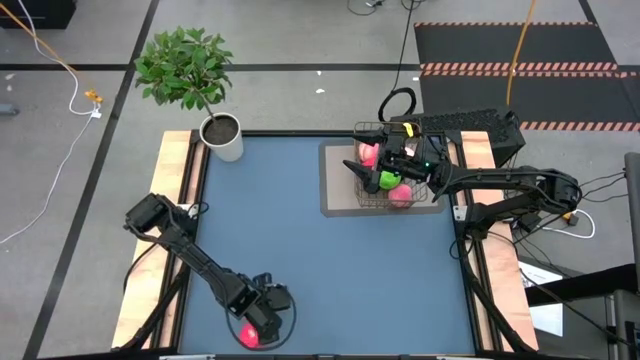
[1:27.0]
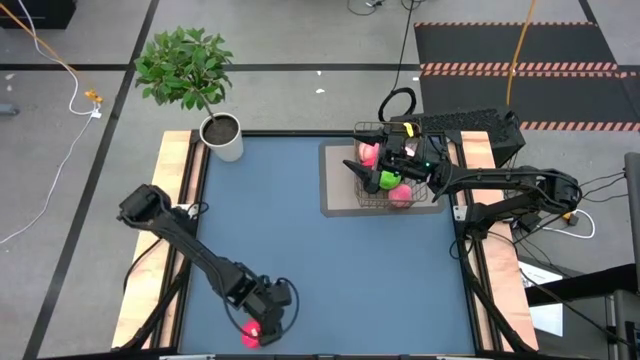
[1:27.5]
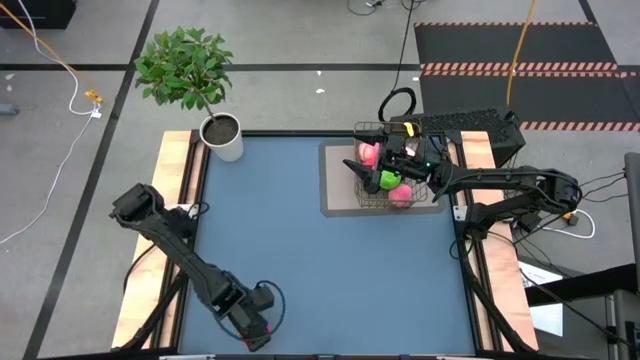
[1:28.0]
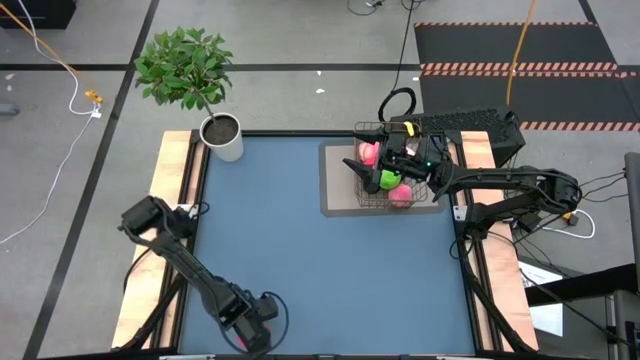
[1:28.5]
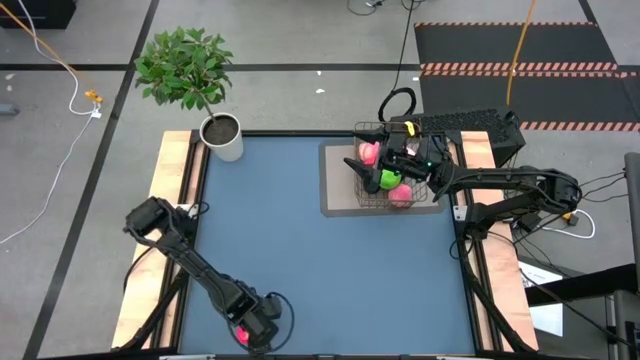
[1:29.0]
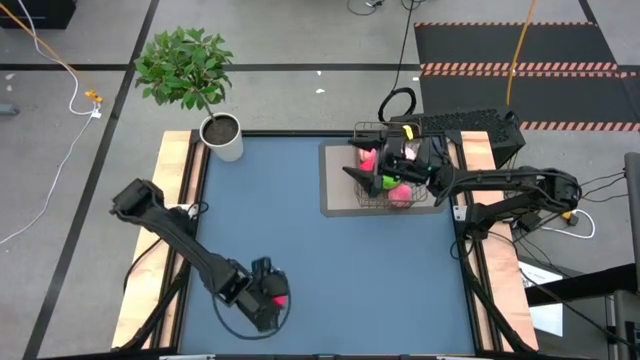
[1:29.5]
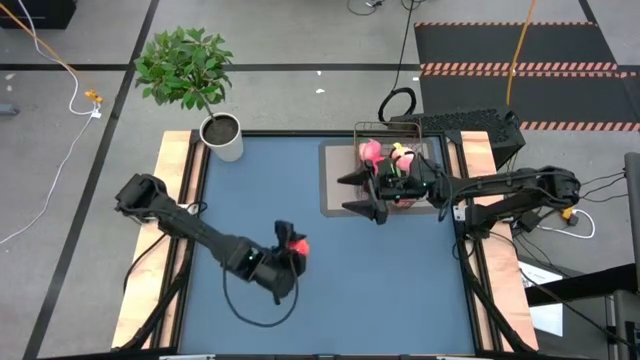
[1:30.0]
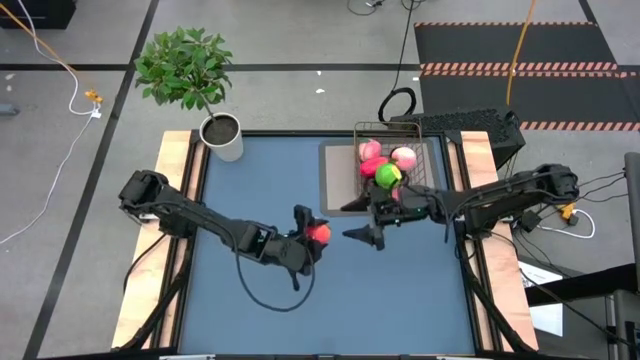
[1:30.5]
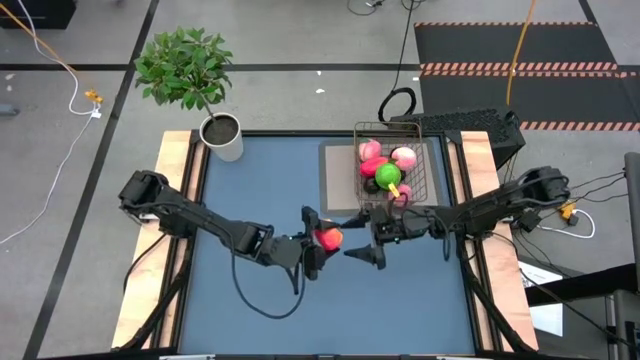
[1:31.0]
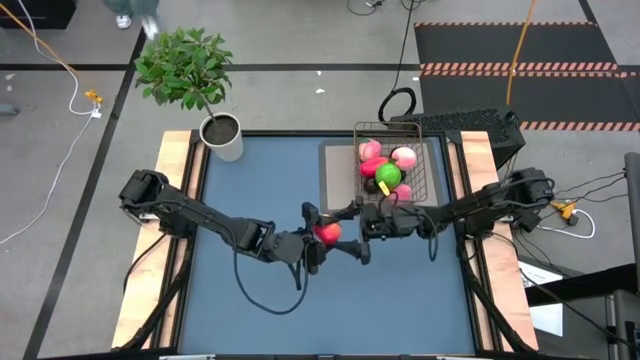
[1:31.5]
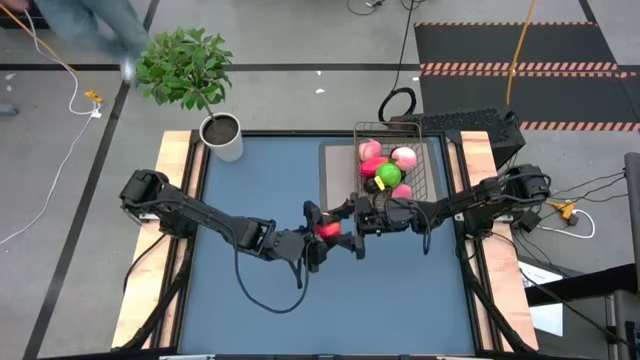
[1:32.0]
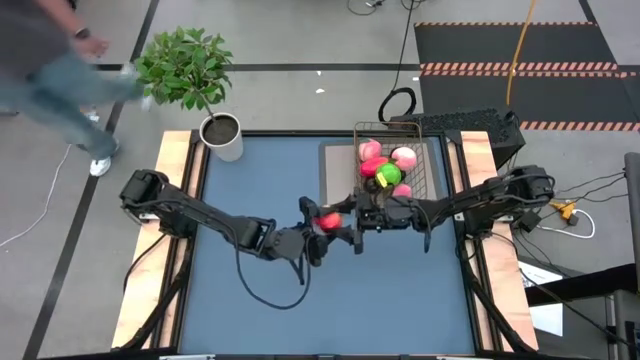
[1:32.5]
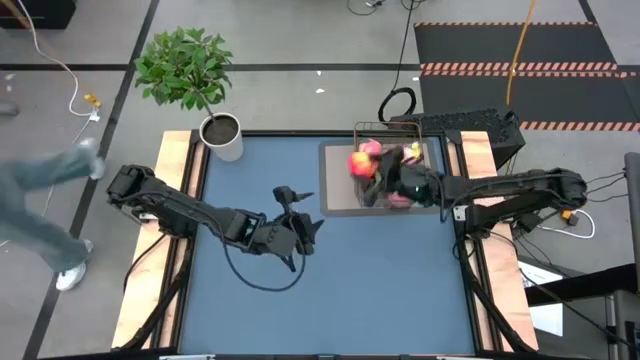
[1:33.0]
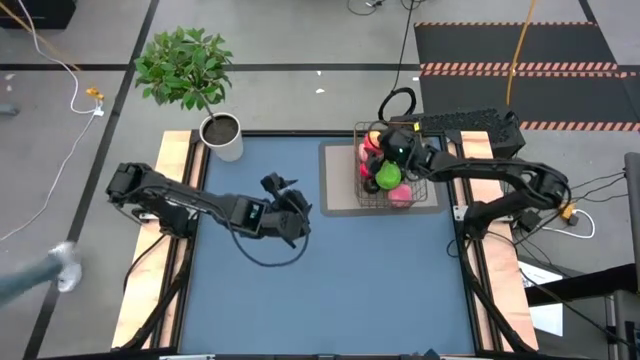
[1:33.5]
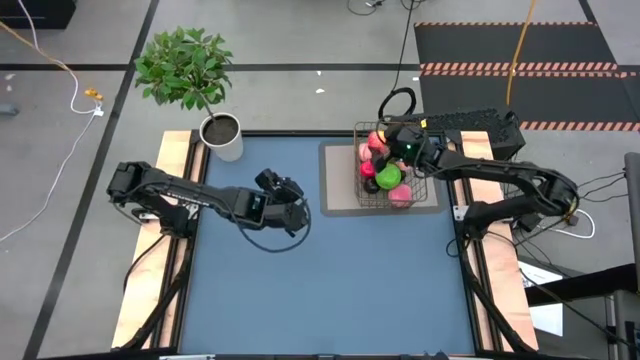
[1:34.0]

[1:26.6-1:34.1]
Task: Build produce basket
Put the orange tomato into the gold wire basket

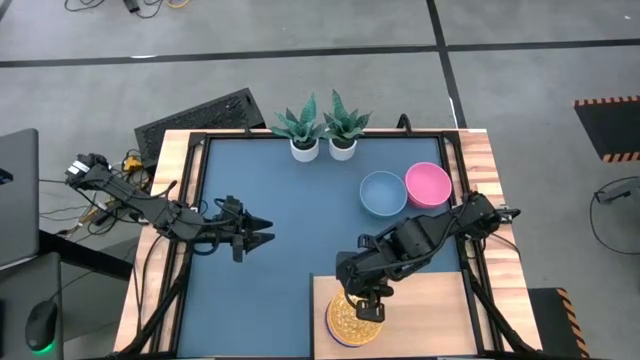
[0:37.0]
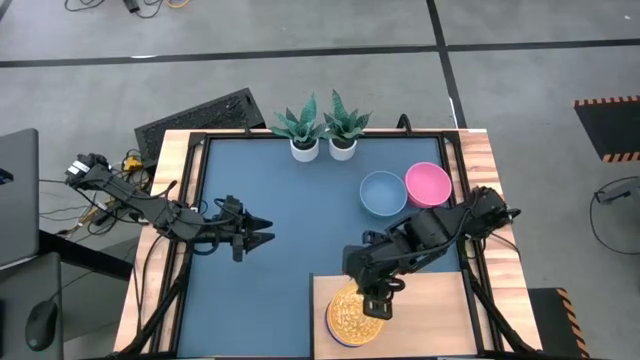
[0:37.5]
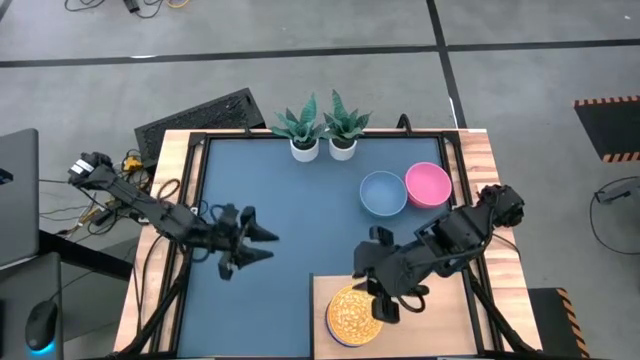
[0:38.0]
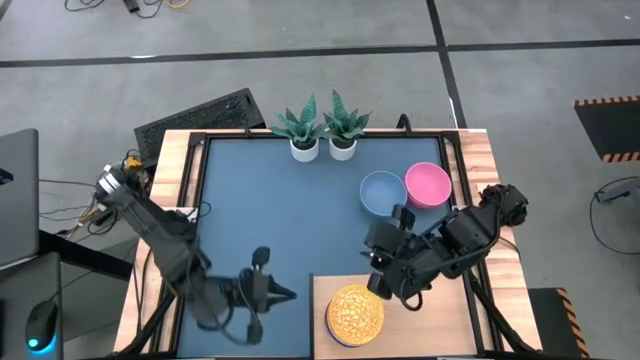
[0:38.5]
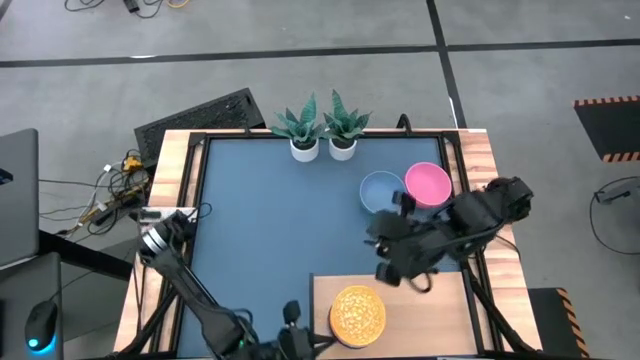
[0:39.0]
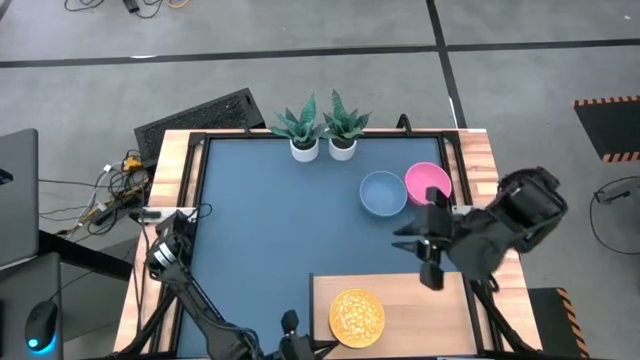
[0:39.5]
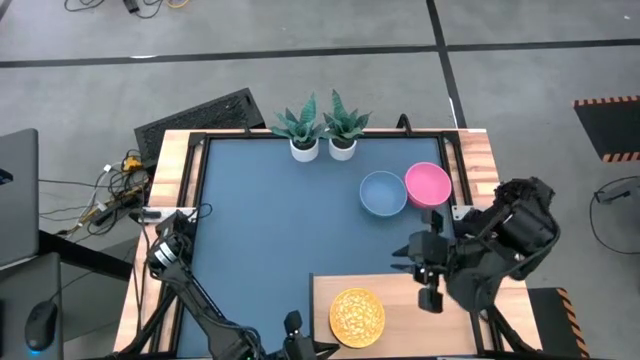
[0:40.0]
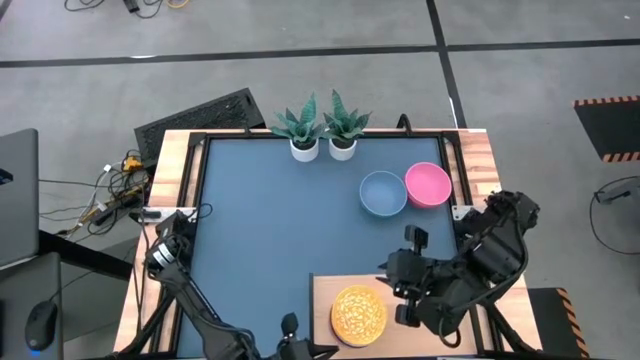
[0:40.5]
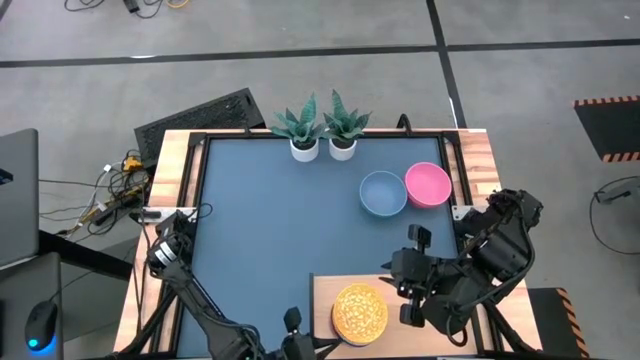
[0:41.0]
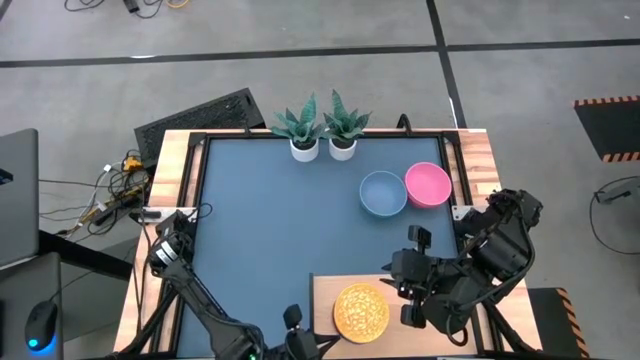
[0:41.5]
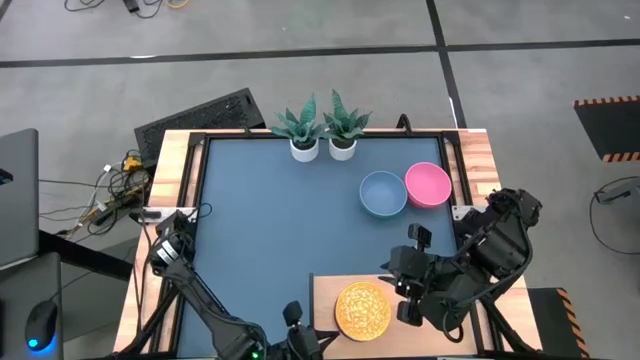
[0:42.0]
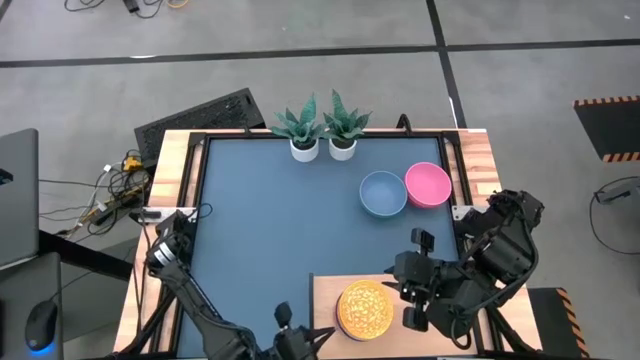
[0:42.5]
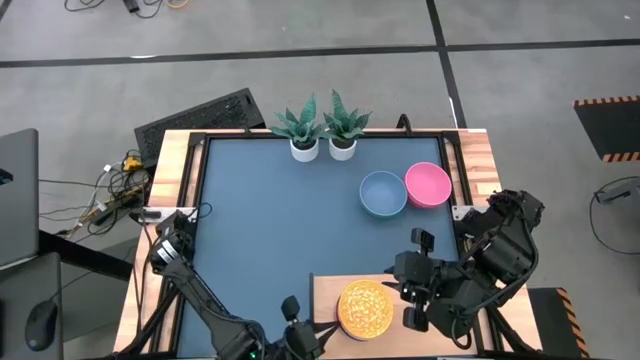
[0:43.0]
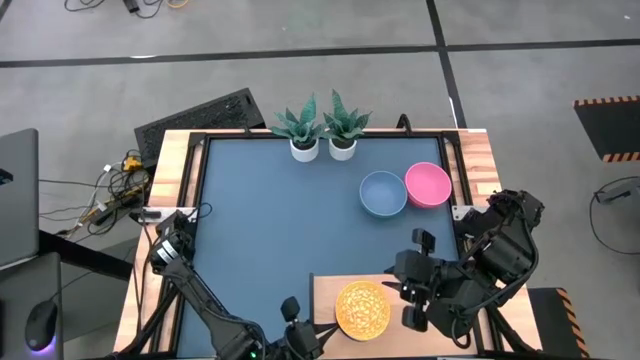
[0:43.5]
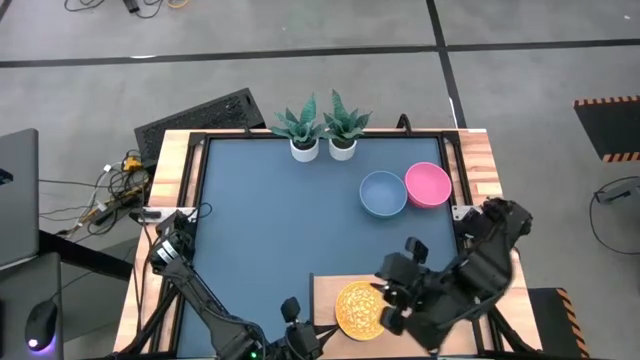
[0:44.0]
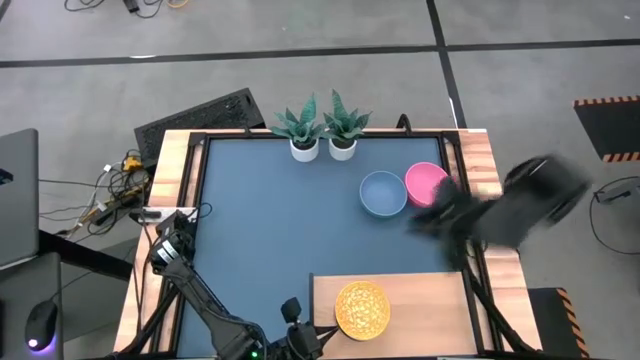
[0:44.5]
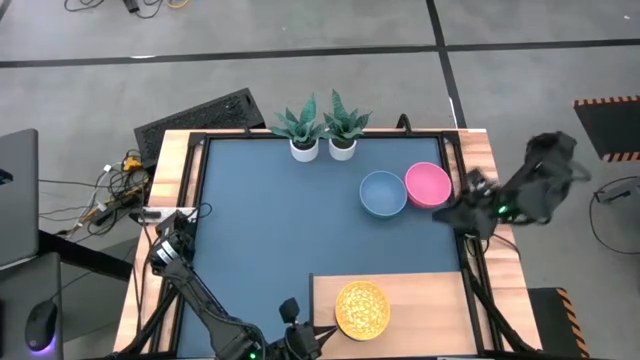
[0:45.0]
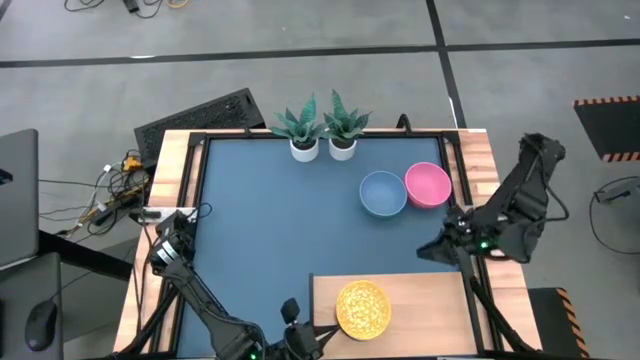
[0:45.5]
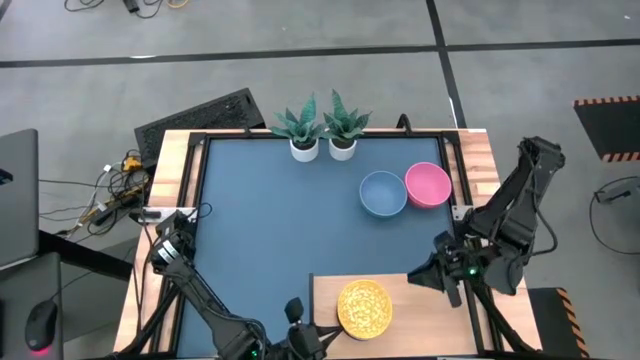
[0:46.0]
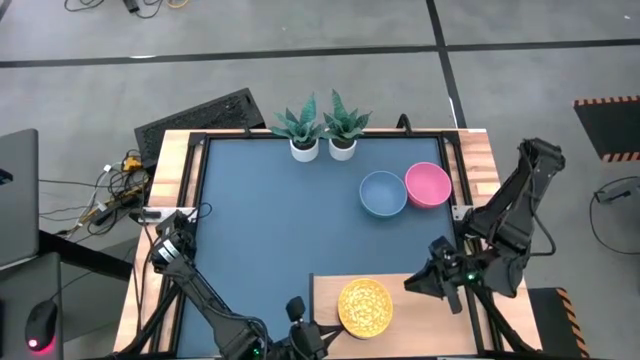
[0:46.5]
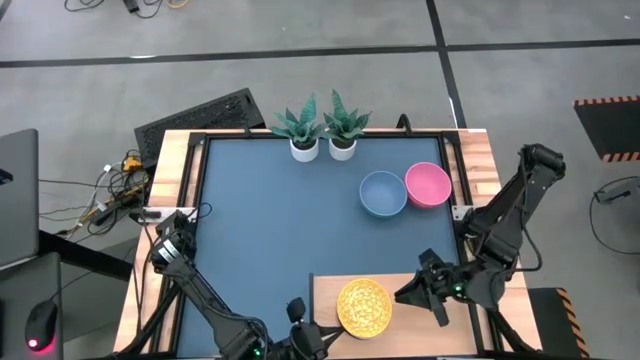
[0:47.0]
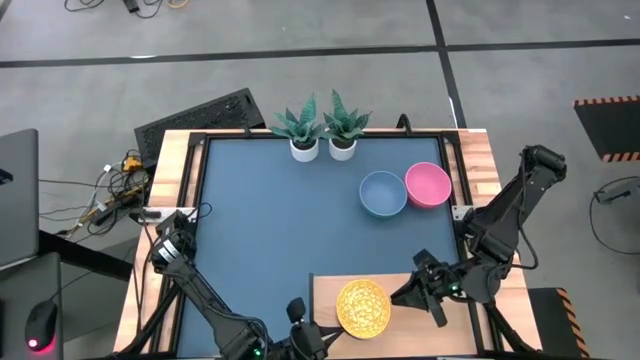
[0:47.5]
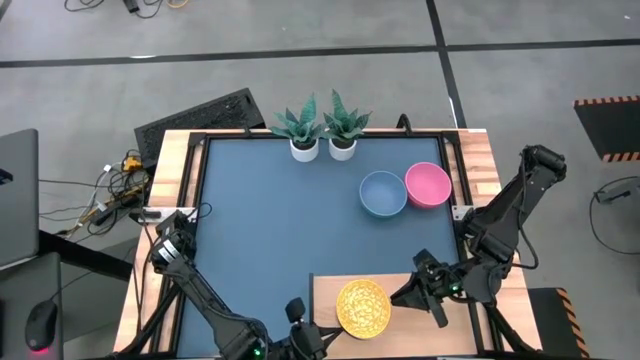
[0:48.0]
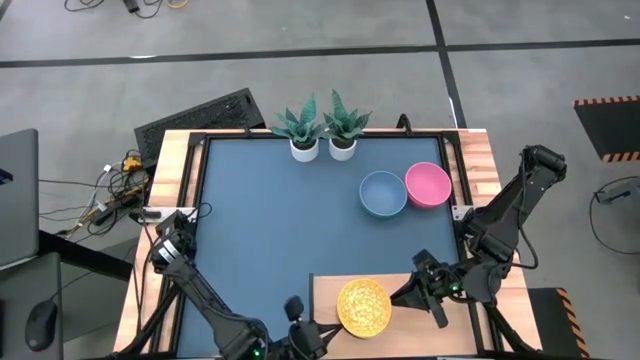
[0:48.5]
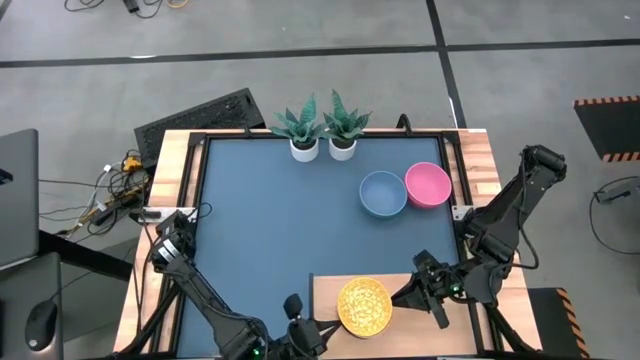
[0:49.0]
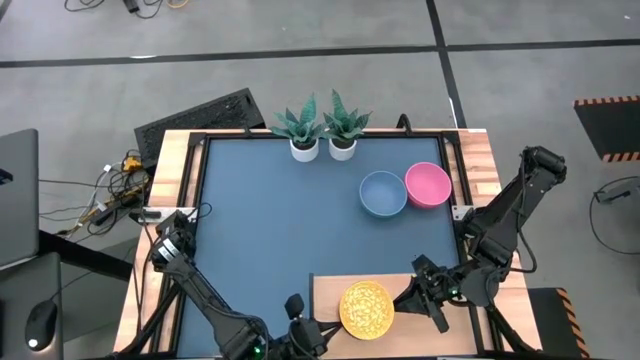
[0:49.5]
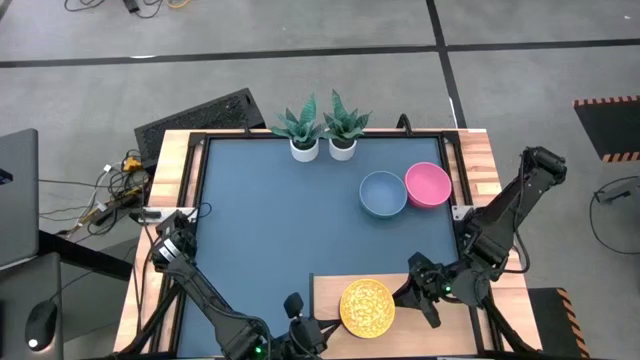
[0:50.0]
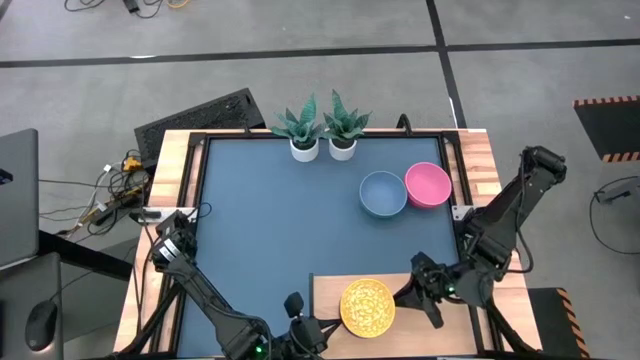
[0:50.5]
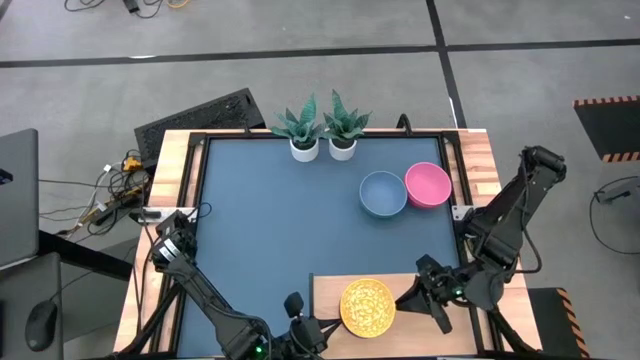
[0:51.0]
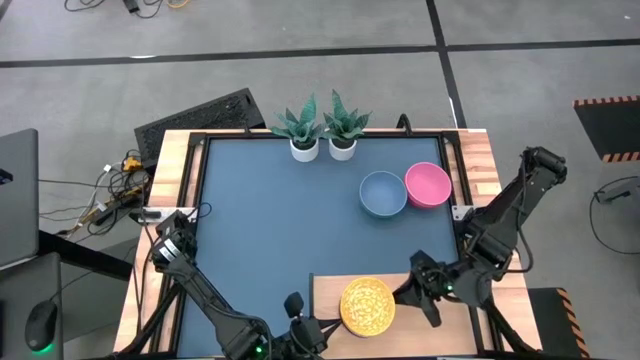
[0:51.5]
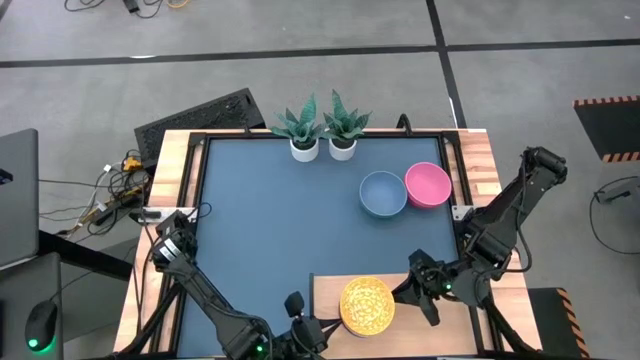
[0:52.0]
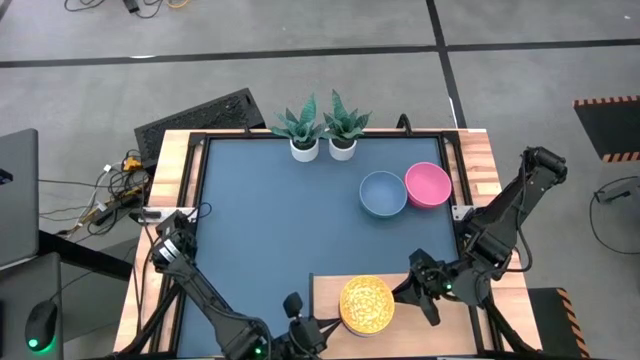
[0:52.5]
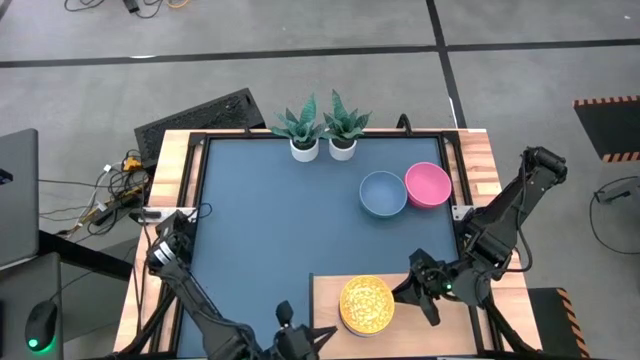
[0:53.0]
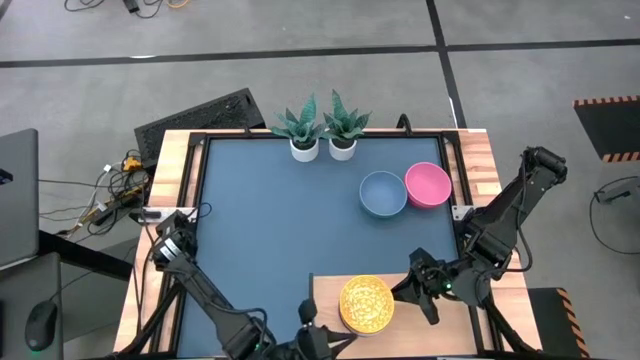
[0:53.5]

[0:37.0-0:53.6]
Task: Place and stack bowls onto a shelf
Adjust the stacked bowls on the shelf
